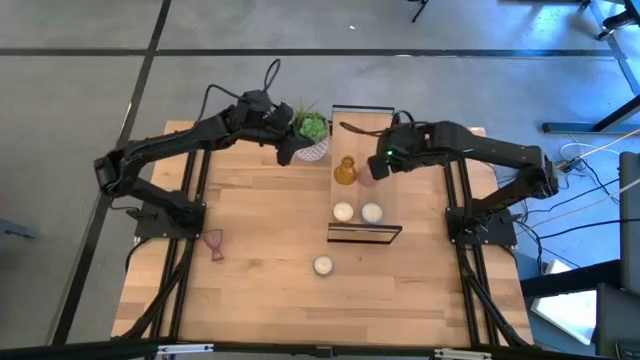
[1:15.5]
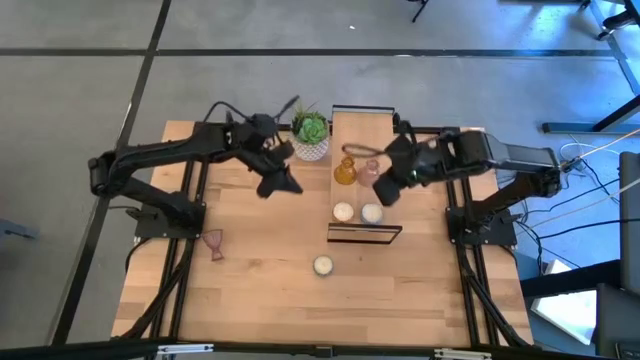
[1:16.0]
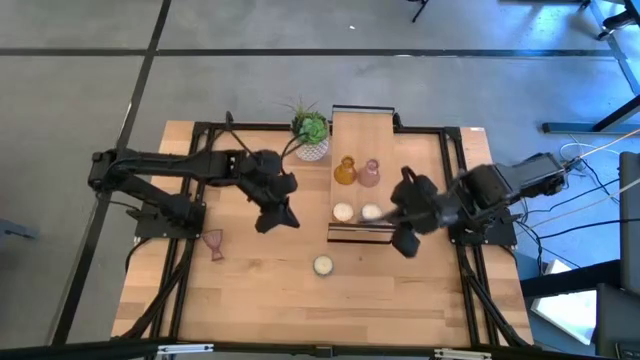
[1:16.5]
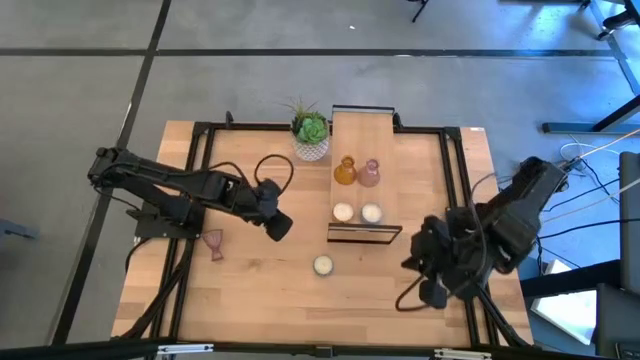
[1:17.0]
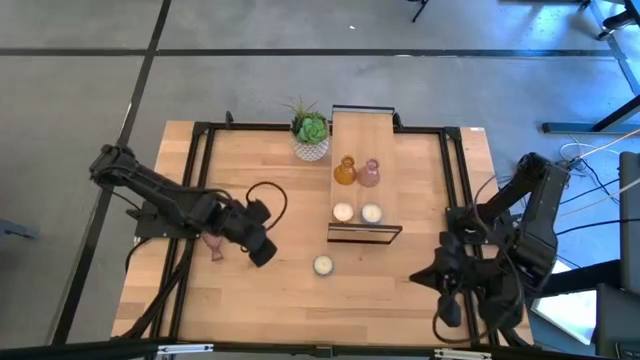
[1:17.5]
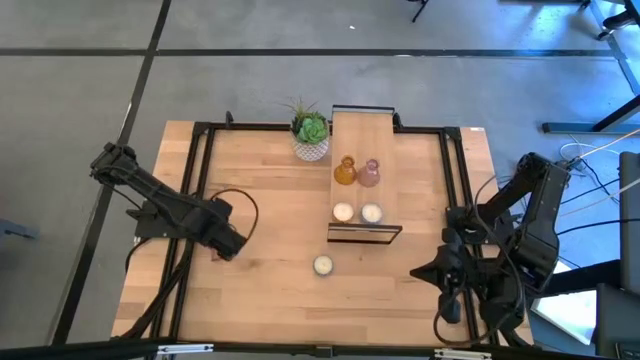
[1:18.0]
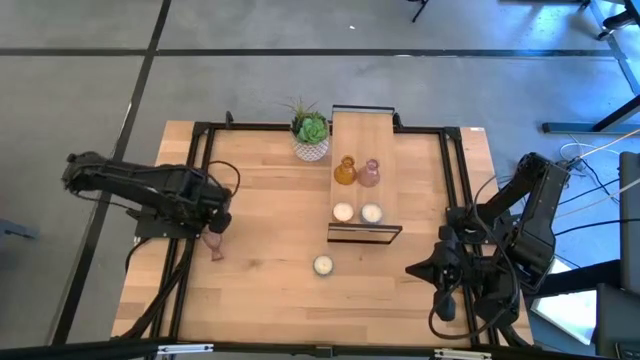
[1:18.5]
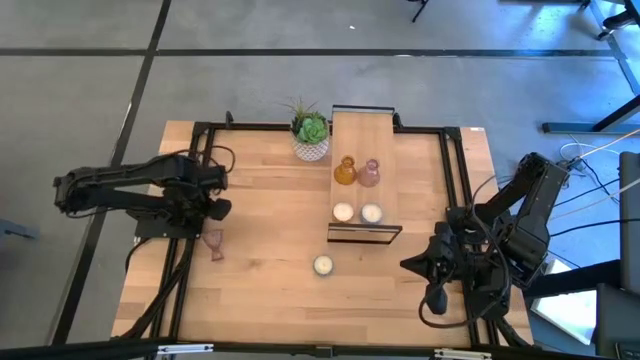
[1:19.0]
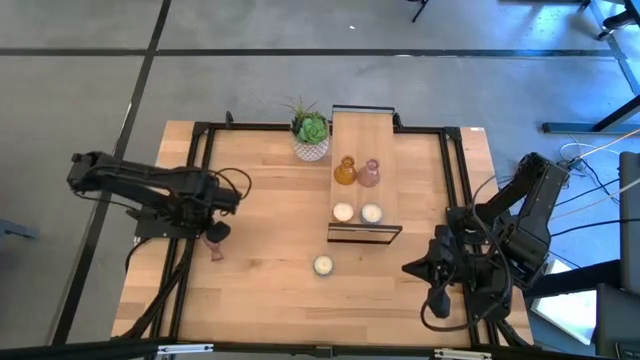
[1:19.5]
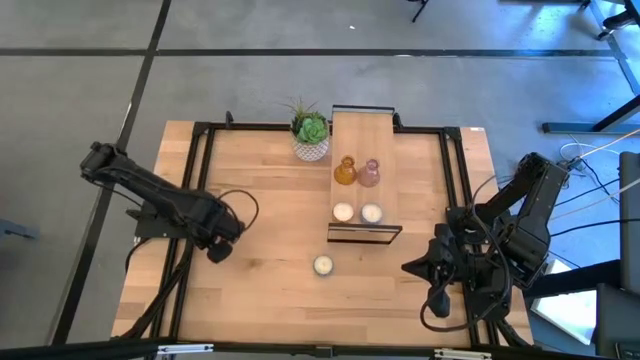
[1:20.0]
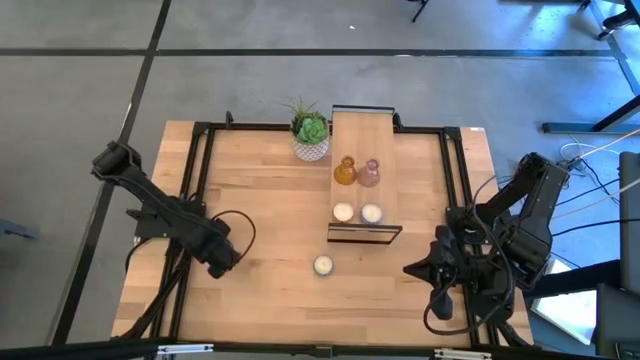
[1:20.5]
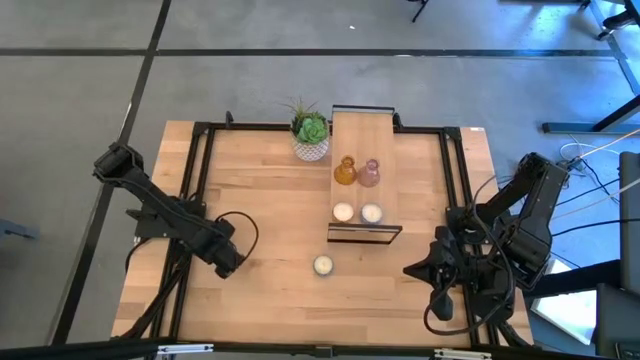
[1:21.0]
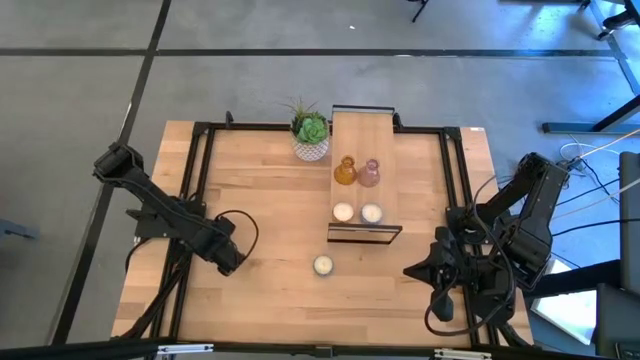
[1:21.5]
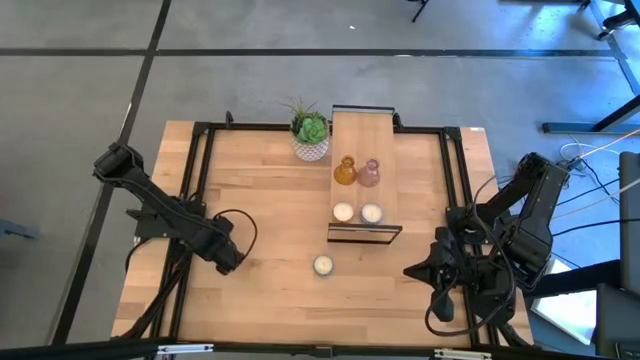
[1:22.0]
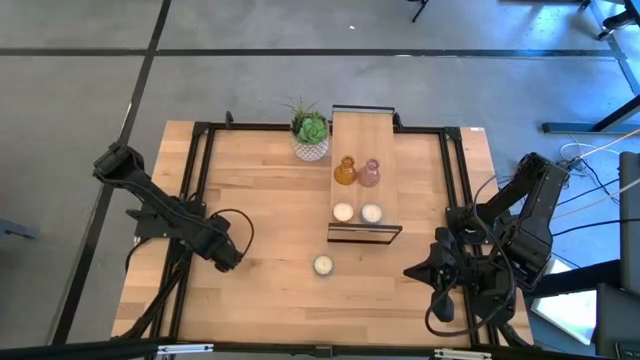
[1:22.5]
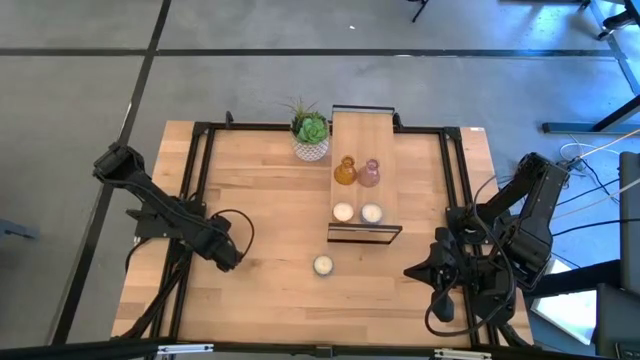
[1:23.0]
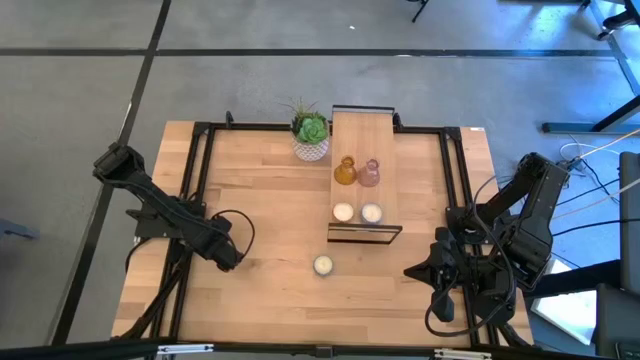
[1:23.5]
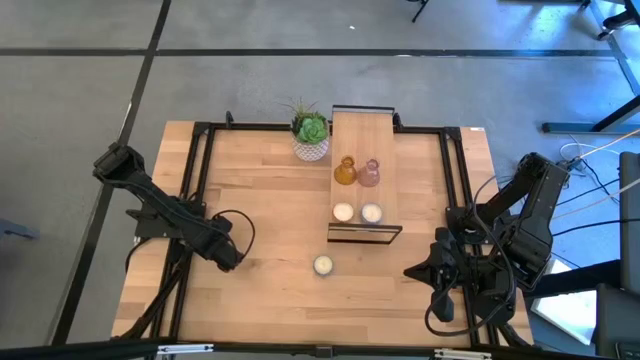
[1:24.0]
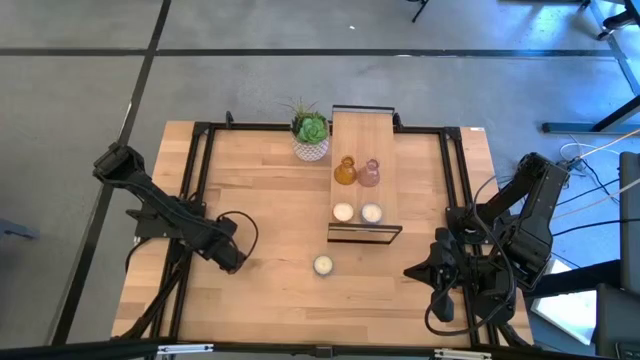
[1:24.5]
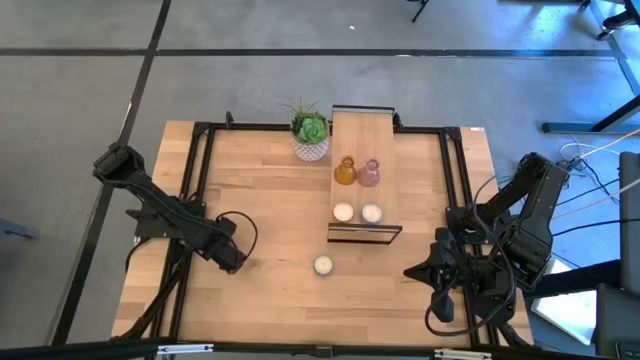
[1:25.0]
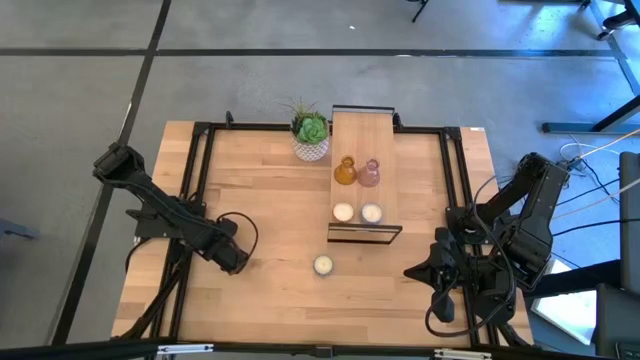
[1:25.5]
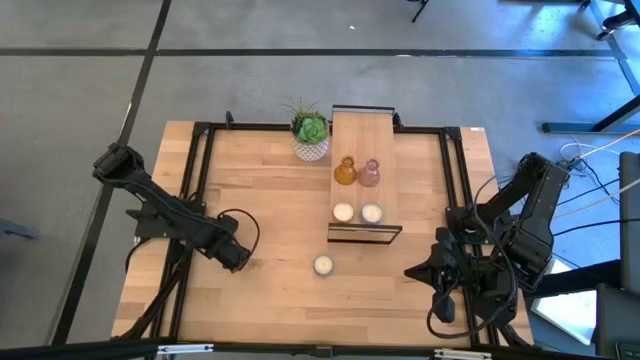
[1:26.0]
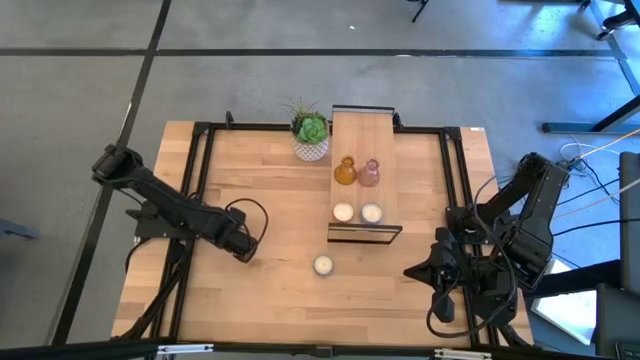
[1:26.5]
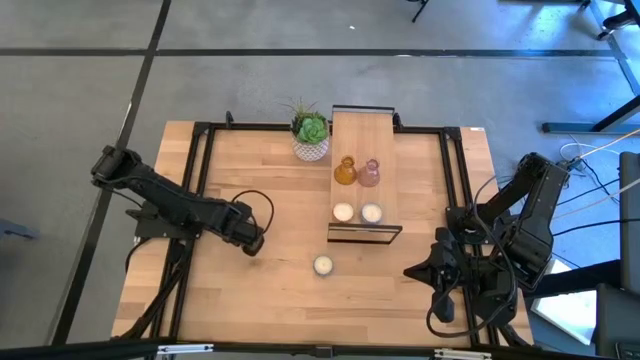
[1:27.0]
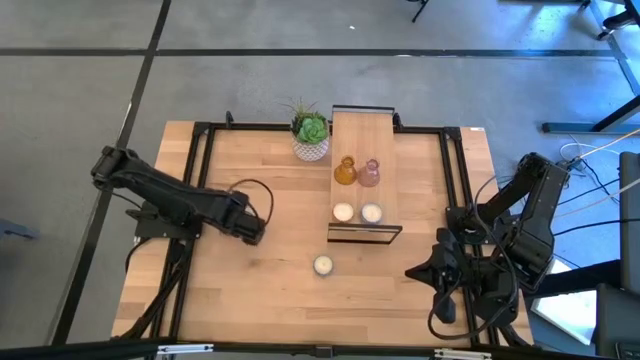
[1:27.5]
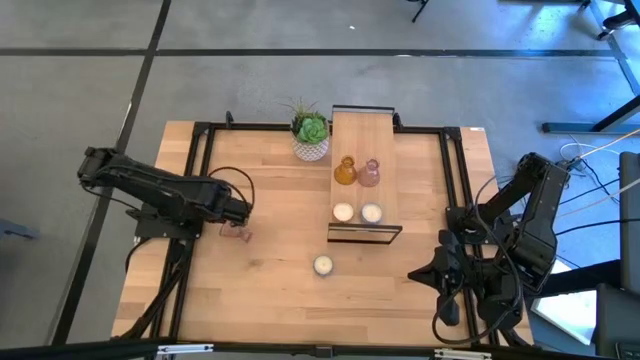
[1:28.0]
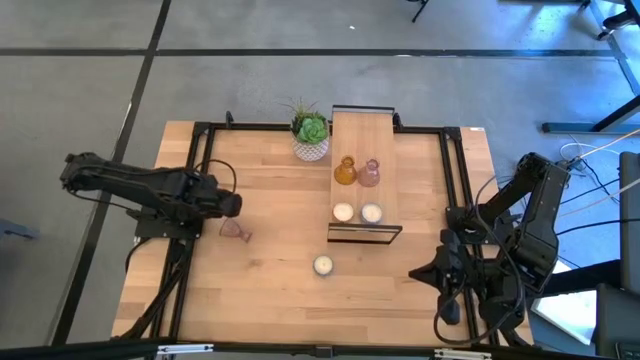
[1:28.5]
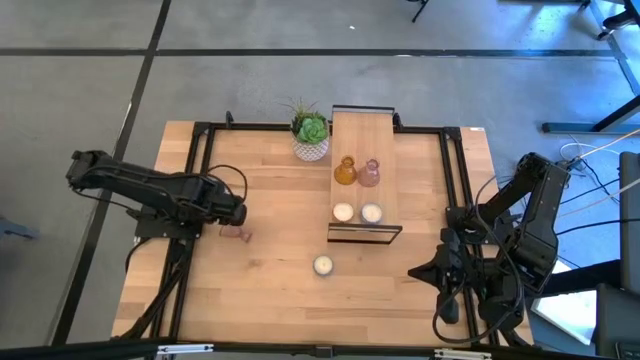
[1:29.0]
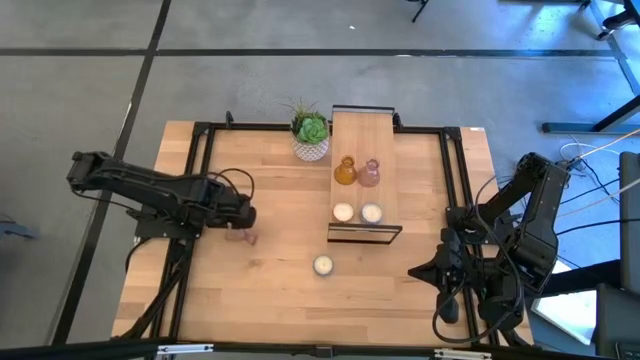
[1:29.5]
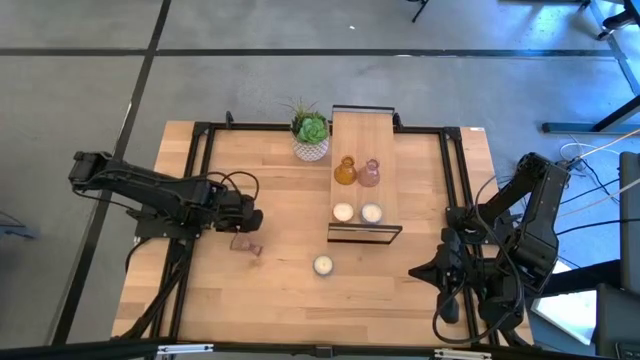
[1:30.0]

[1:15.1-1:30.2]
Task: Pick & Place candle stick holders
Put the pink glass candle holder on the shelf
